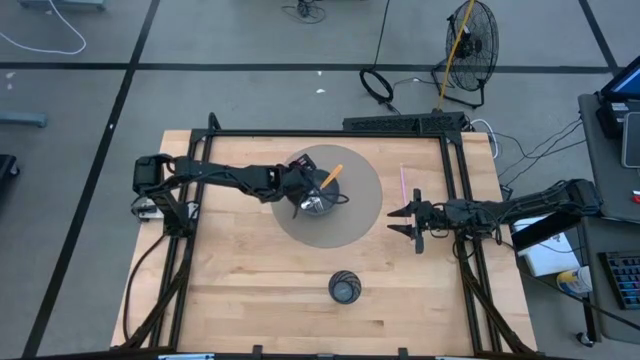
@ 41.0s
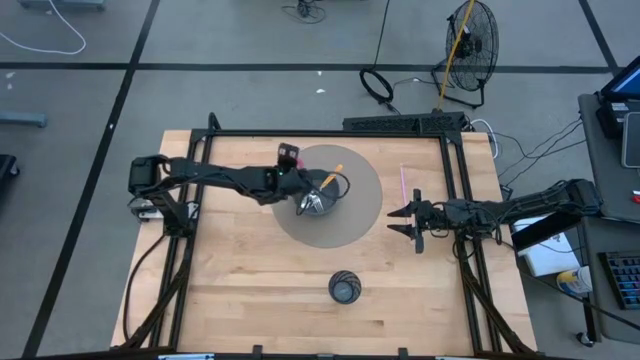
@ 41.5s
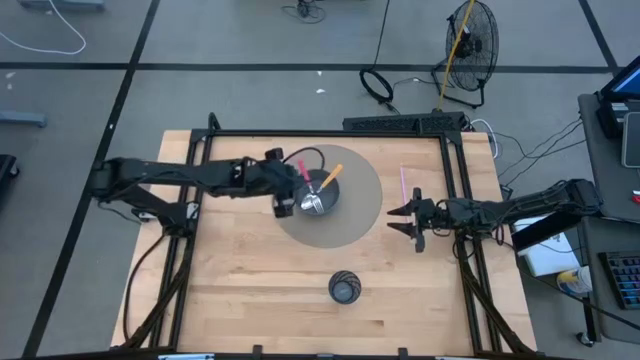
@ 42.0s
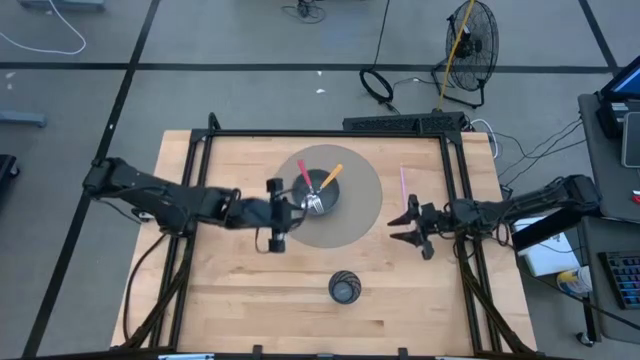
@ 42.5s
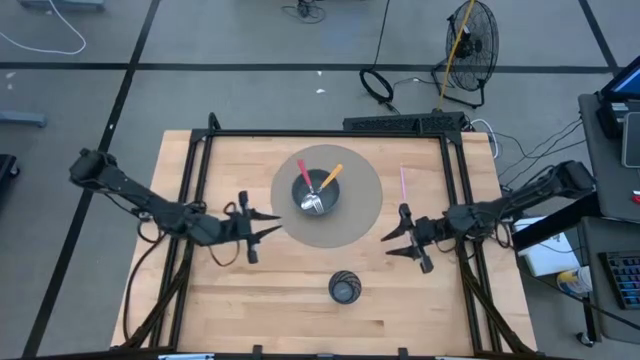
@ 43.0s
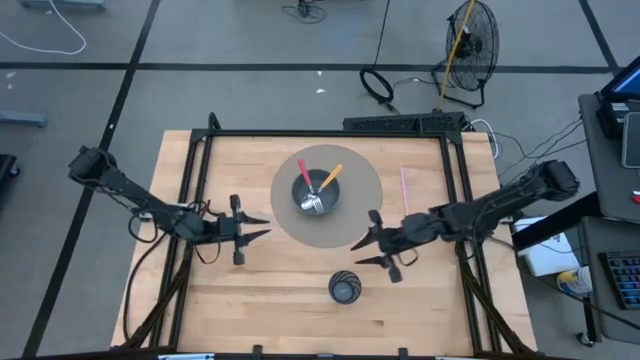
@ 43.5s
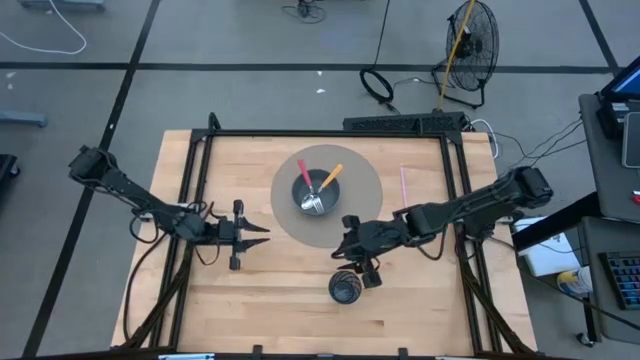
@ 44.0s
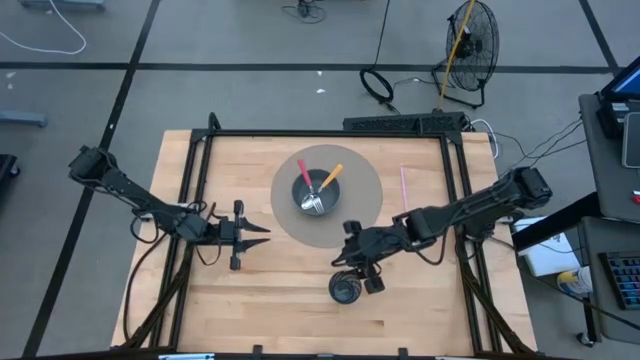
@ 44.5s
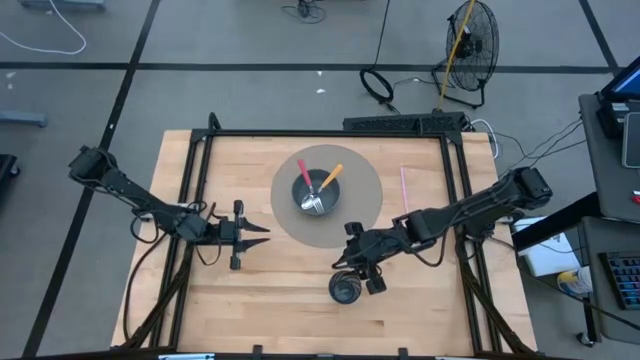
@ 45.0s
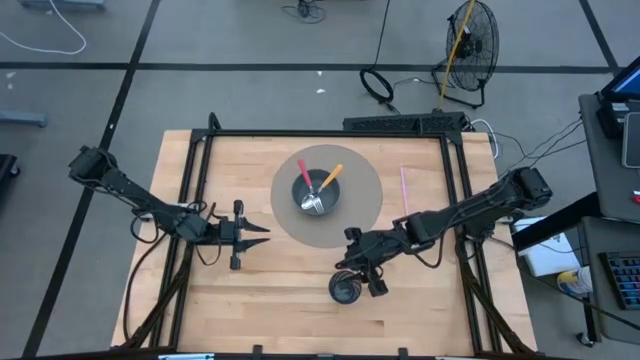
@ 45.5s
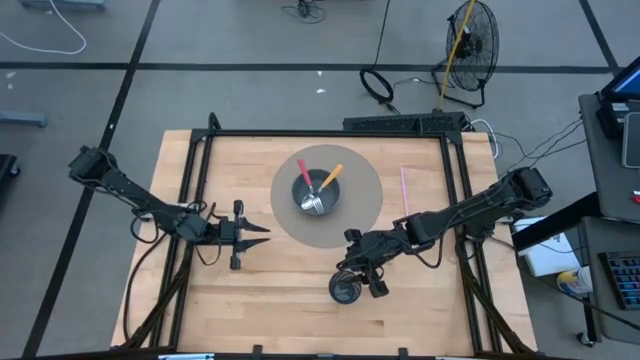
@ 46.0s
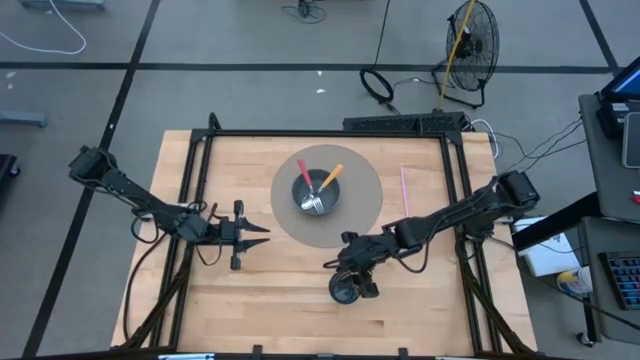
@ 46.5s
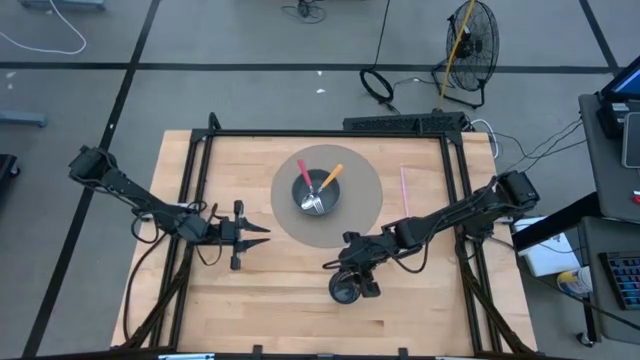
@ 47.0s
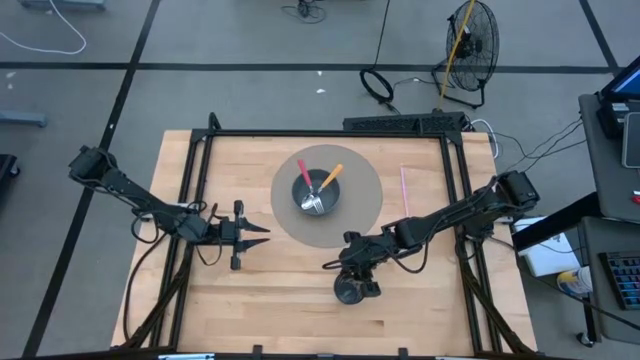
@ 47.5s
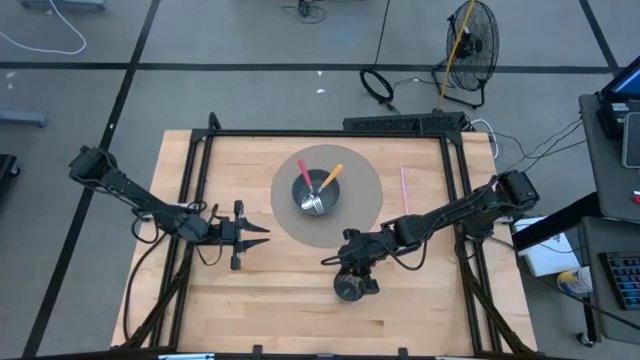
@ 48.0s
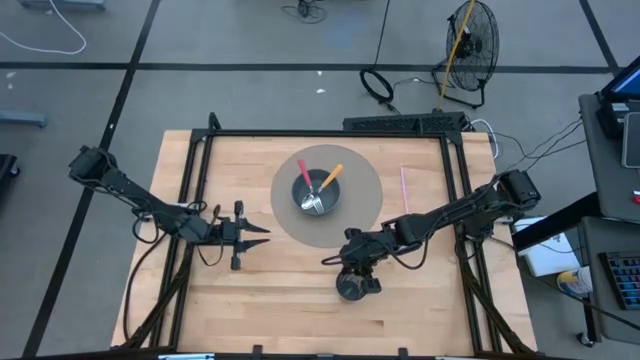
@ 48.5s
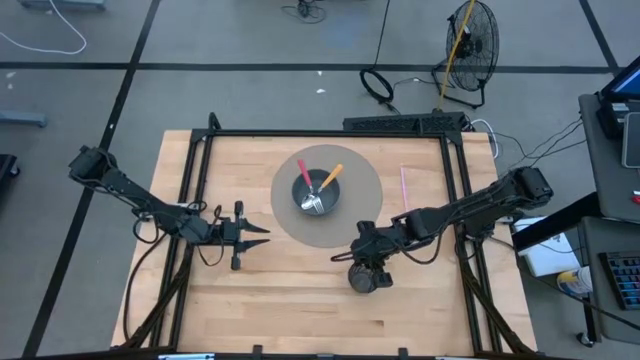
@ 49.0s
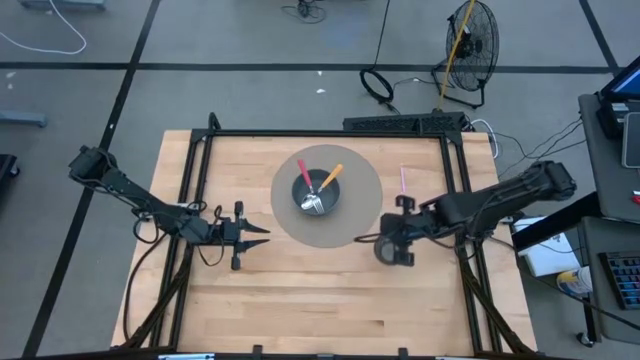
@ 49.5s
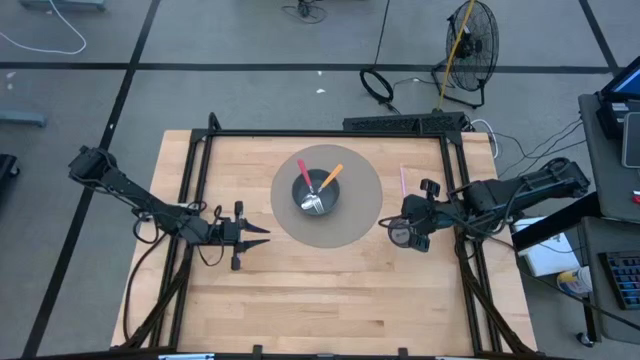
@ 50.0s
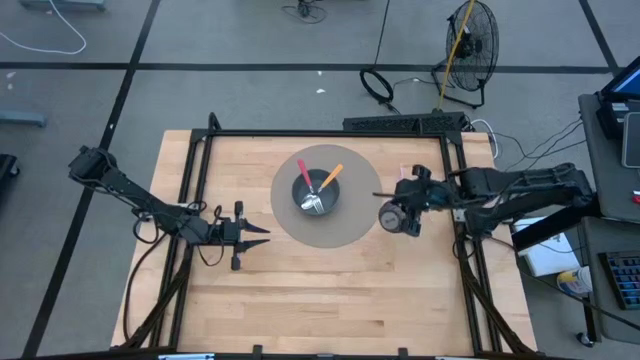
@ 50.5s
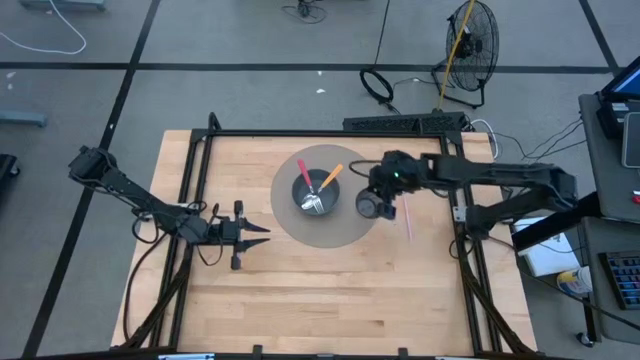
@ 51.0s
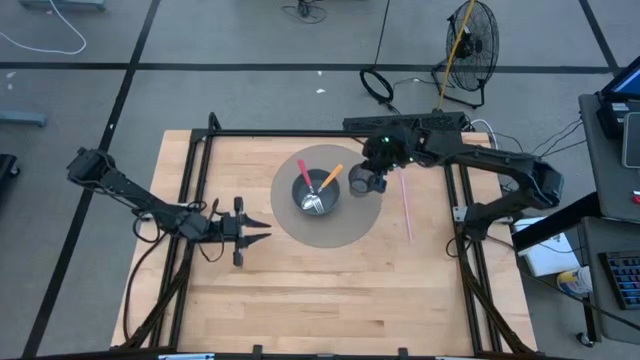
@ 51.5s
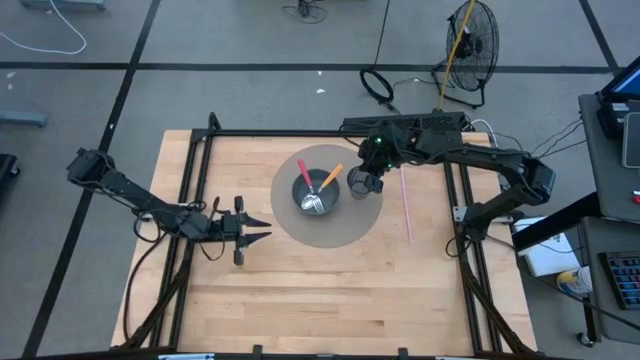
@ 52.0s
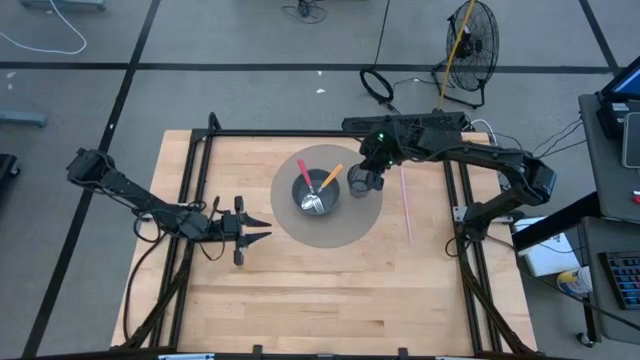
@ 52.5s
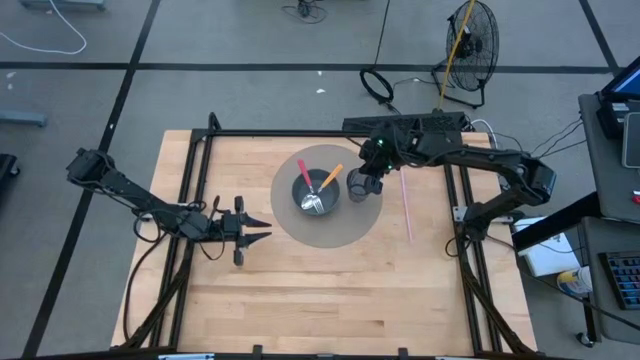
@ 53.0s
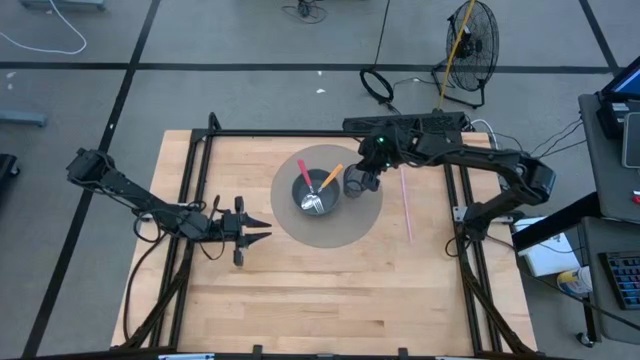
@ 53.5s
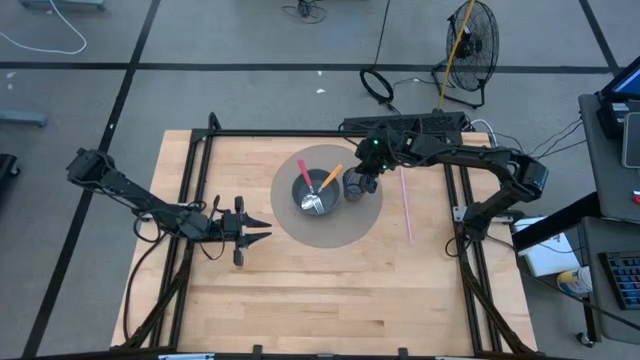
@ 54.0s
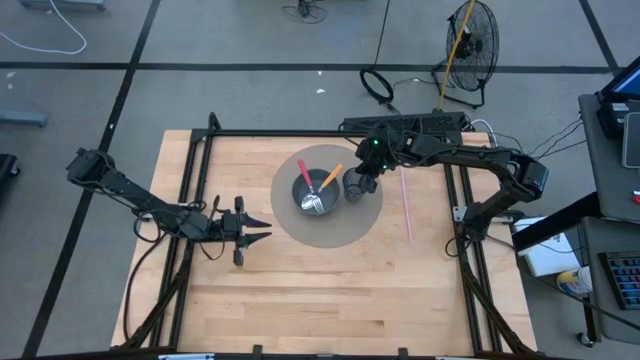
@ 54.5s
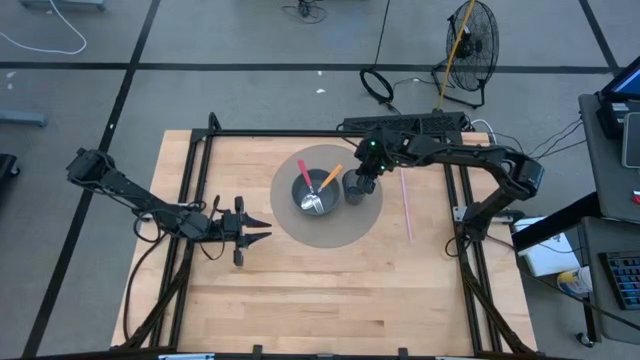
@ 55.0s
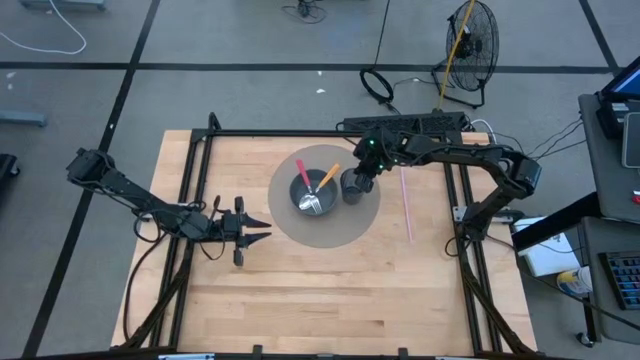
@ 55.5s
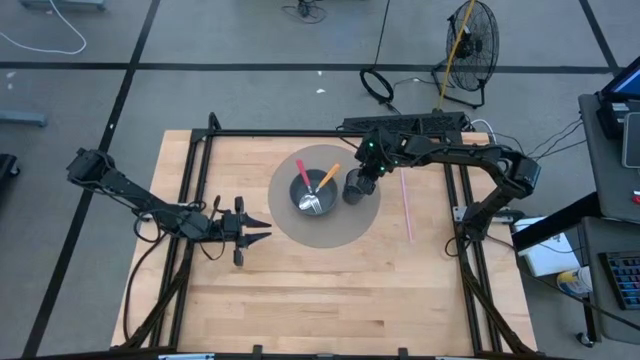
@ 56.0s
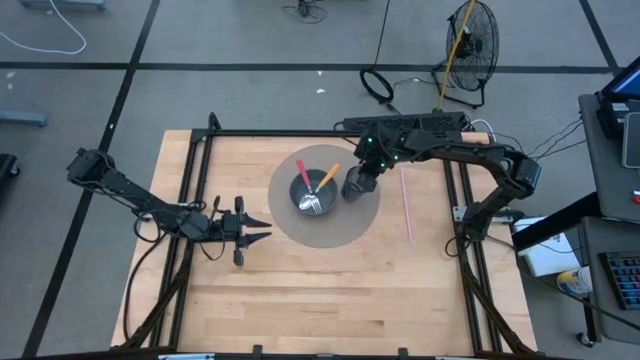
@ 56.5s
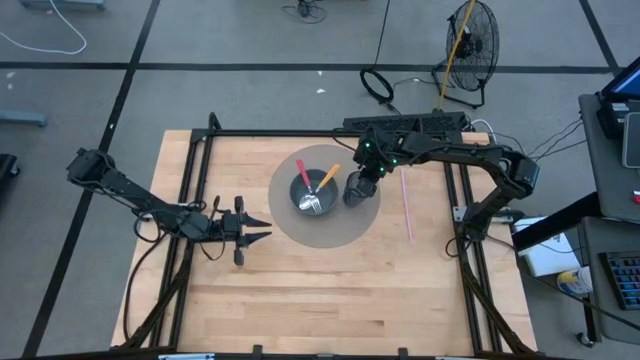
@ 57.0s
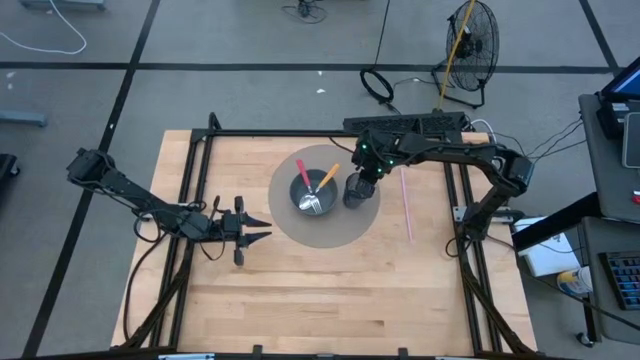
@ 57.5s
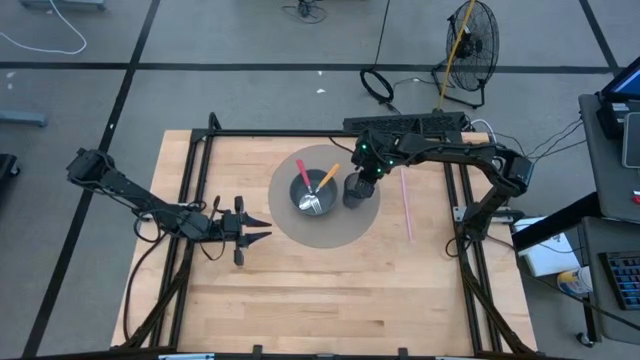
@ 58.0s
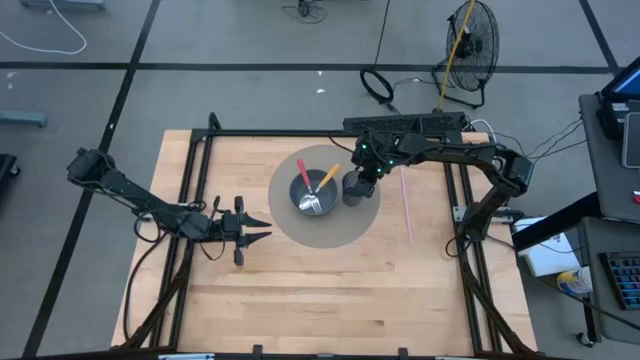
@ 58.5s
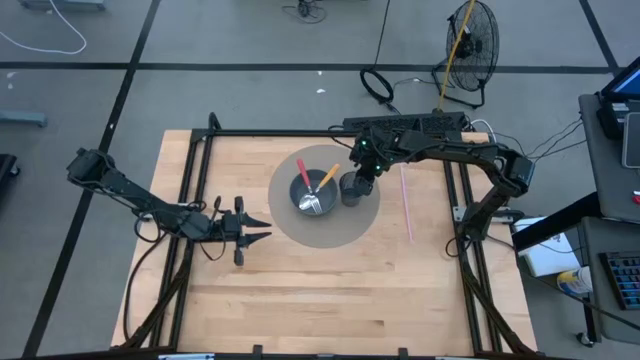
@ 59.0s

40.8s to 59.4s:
Task: Pick & Place Utensil
Move the dark blue cup to the dark blue bowl on the gray placemat

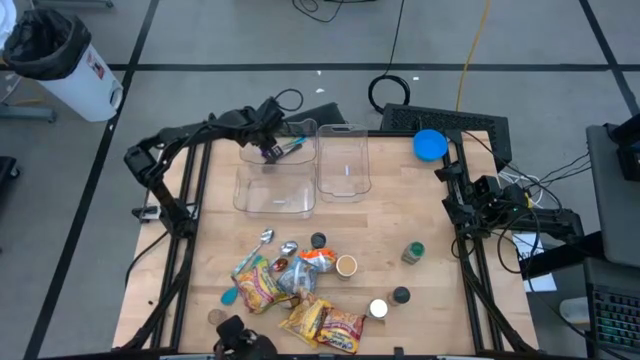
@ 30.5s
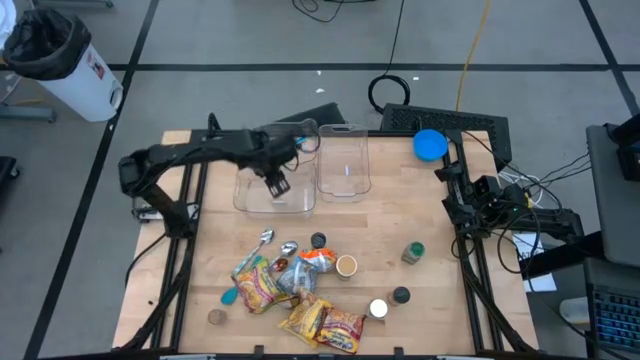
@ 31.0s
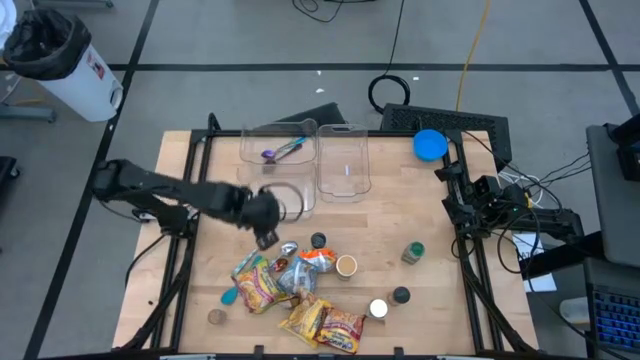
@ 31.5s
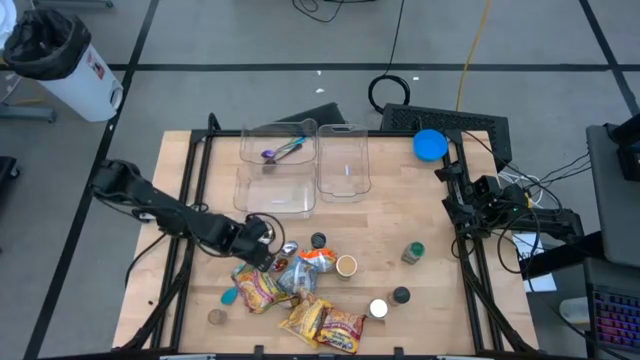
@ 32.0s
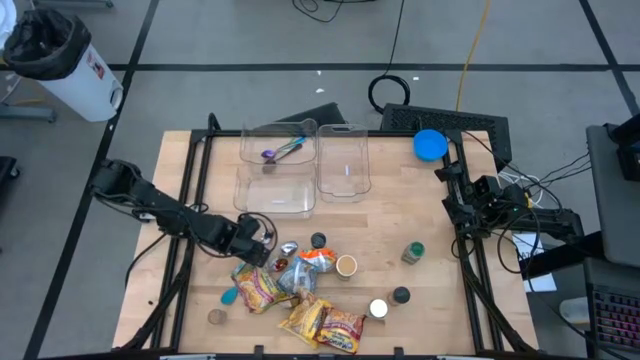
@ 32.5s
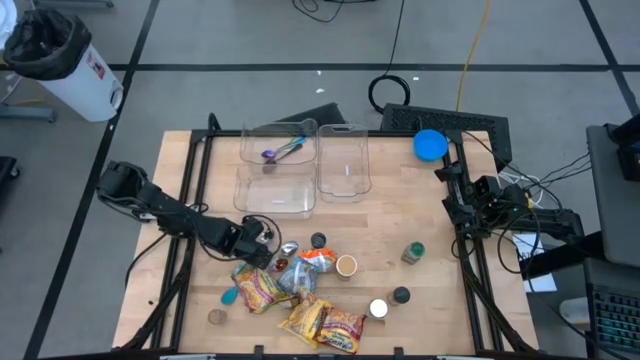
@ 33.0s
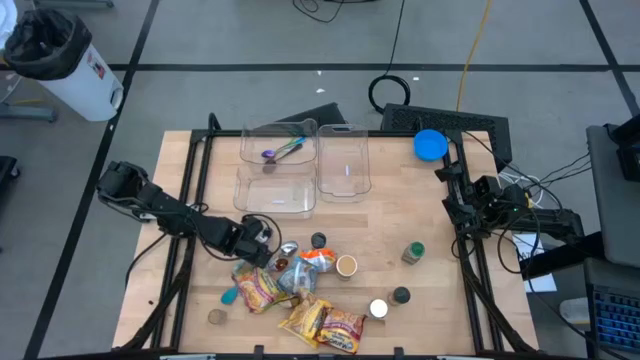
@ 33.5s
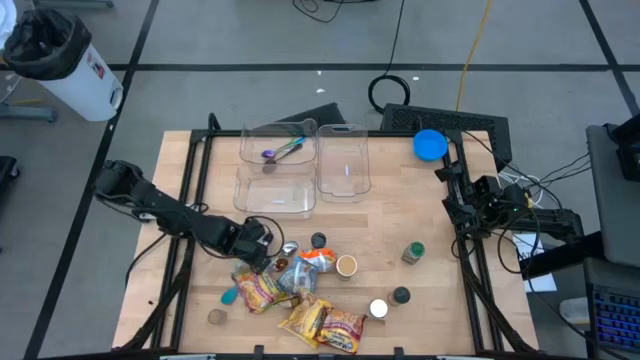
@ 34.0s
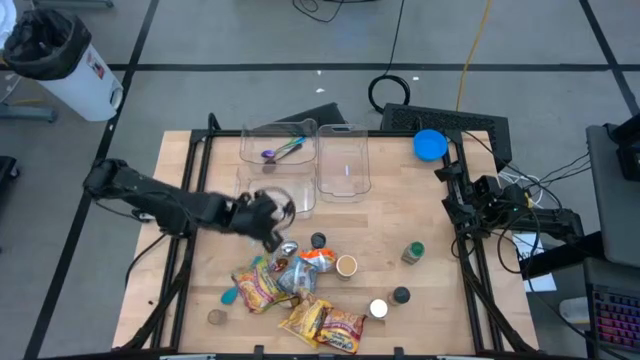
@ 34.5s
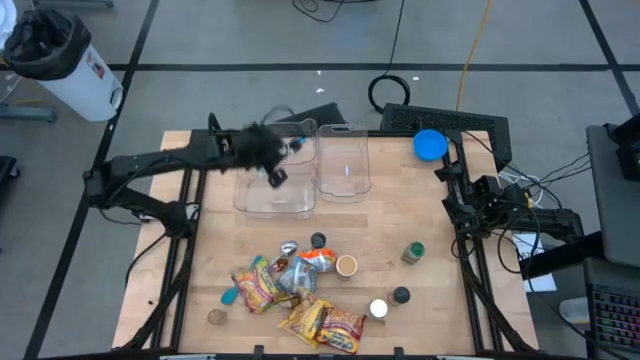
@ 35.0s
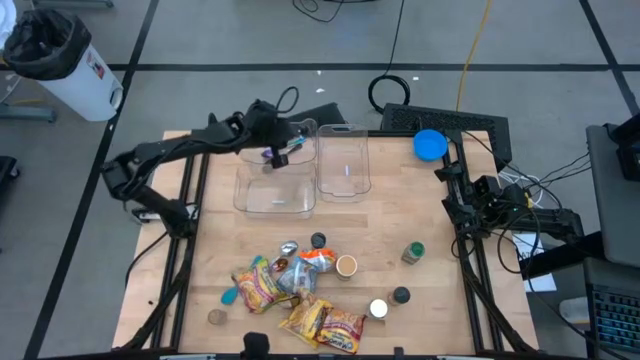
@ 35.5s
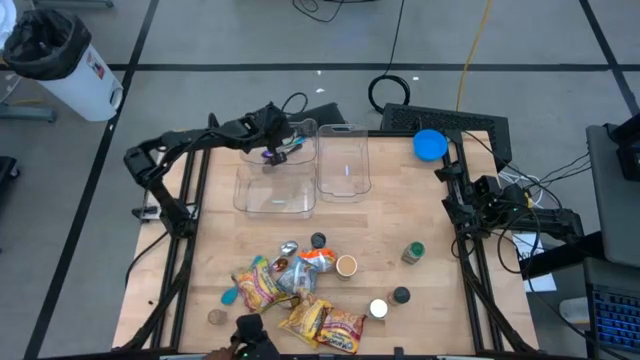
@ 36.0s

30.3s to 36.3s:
Task: Pick & Place Food Item
Put the left green patterned spoon into the top left transparent bin
